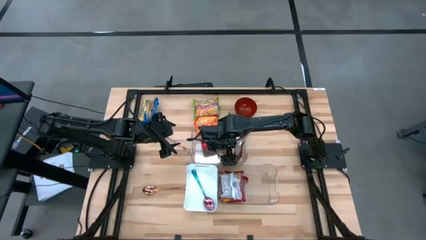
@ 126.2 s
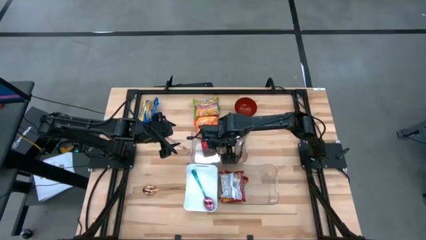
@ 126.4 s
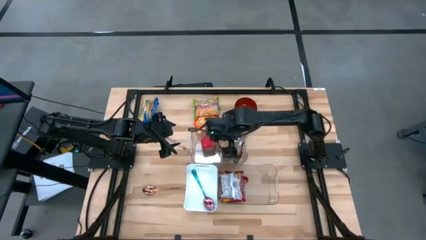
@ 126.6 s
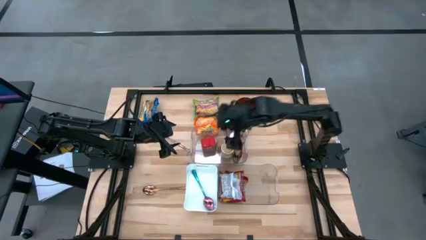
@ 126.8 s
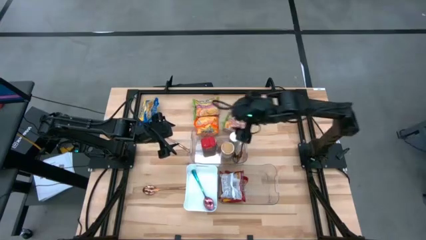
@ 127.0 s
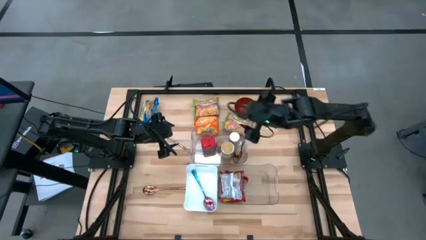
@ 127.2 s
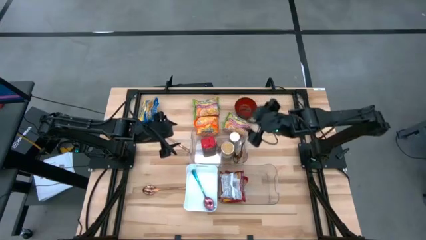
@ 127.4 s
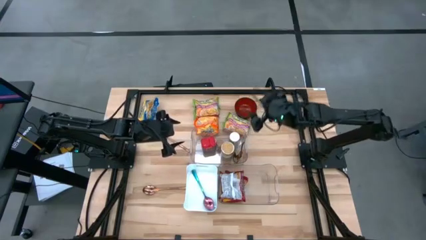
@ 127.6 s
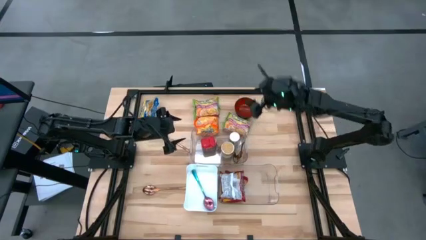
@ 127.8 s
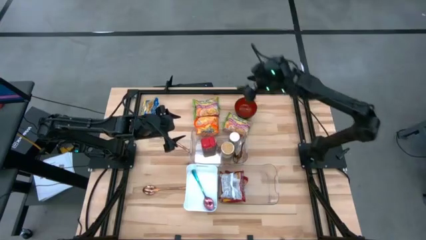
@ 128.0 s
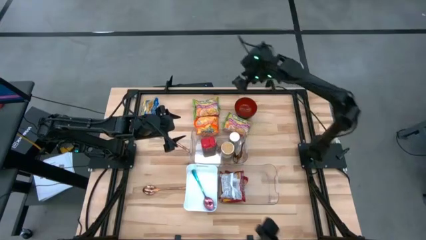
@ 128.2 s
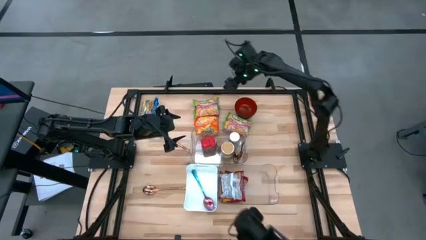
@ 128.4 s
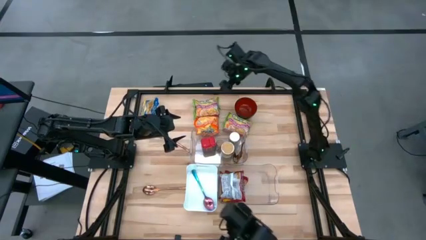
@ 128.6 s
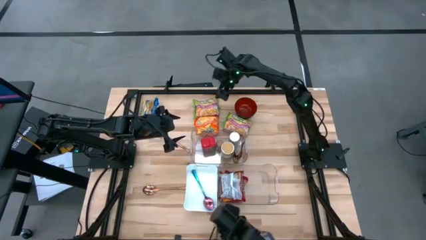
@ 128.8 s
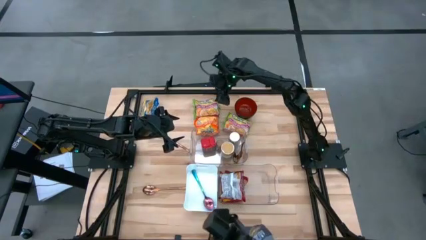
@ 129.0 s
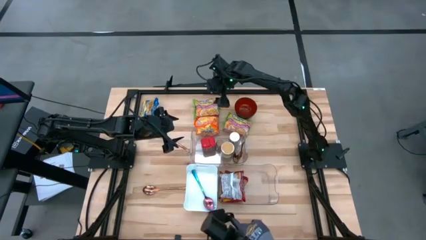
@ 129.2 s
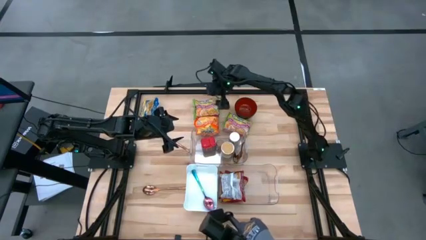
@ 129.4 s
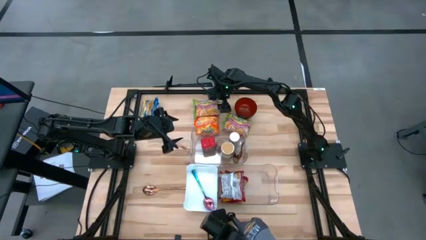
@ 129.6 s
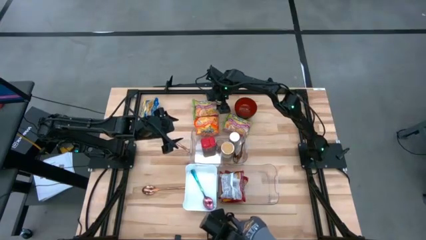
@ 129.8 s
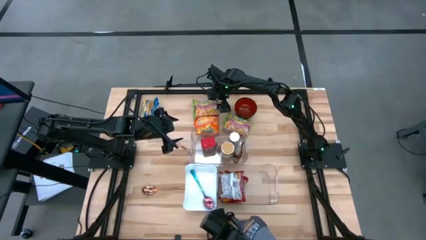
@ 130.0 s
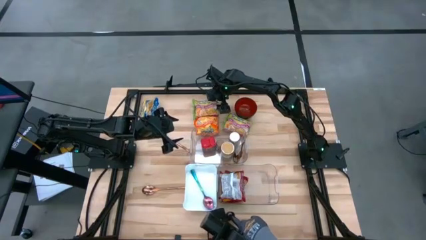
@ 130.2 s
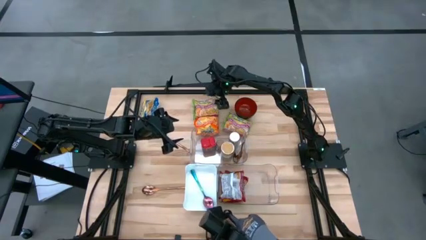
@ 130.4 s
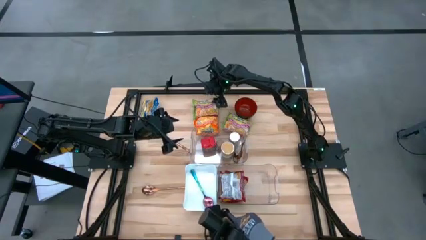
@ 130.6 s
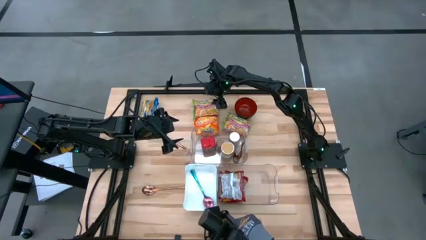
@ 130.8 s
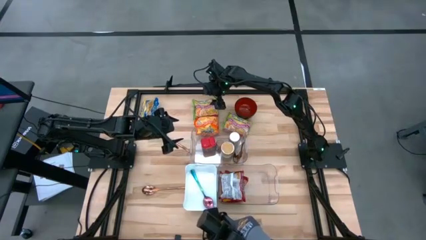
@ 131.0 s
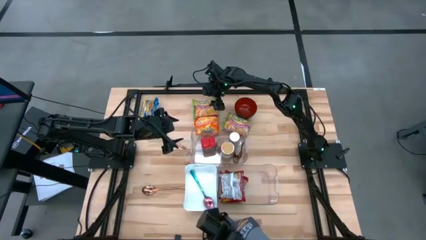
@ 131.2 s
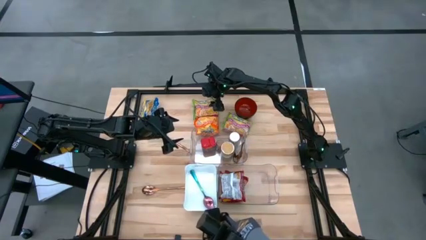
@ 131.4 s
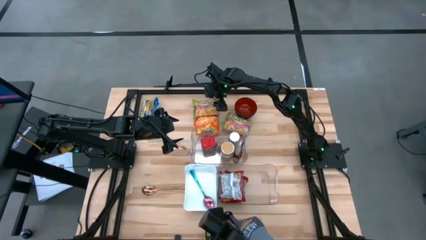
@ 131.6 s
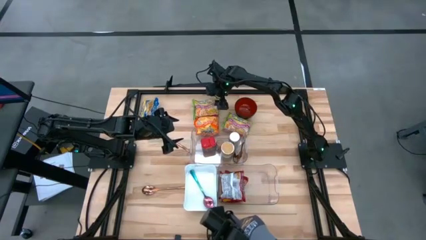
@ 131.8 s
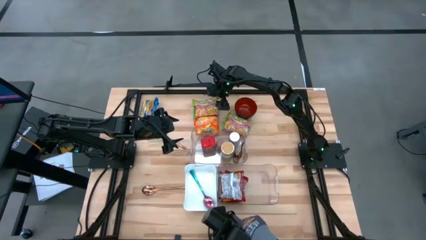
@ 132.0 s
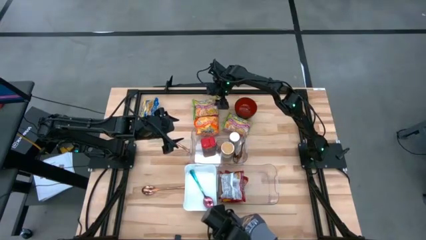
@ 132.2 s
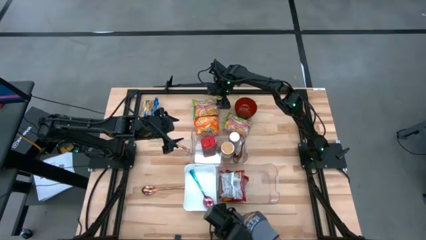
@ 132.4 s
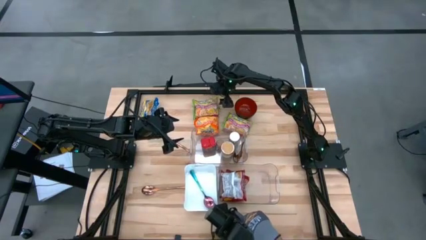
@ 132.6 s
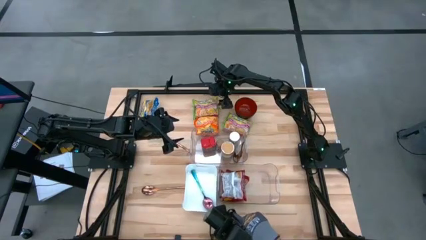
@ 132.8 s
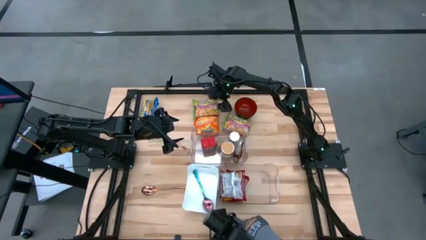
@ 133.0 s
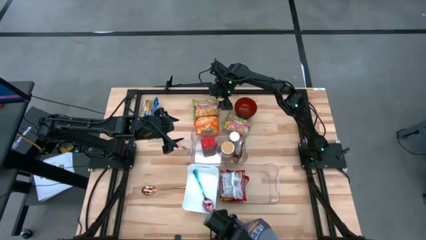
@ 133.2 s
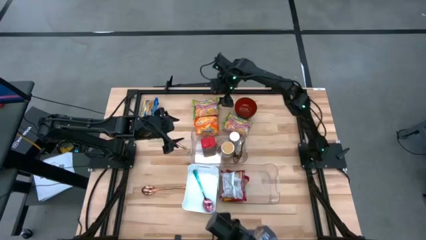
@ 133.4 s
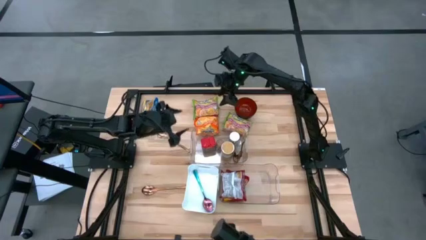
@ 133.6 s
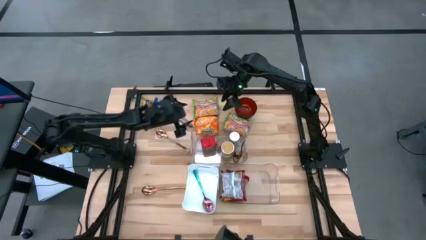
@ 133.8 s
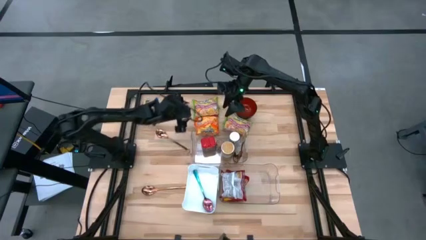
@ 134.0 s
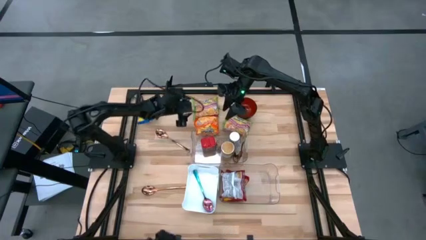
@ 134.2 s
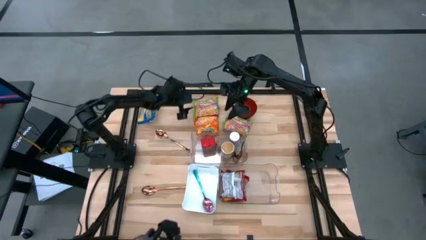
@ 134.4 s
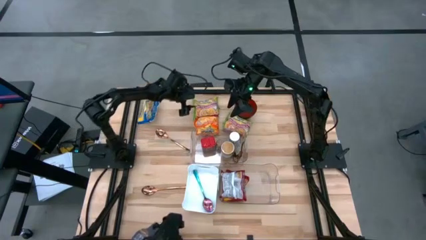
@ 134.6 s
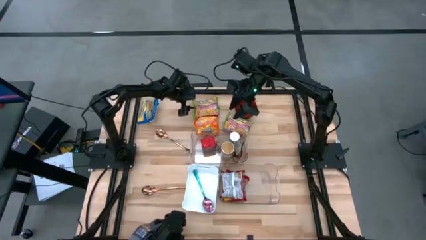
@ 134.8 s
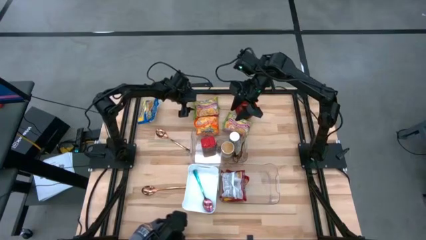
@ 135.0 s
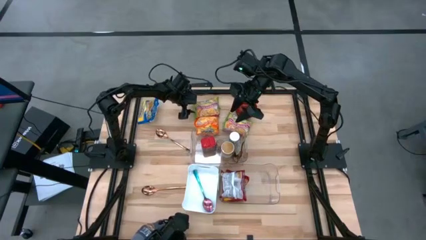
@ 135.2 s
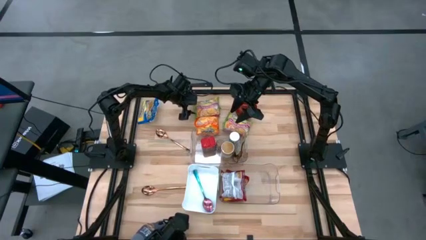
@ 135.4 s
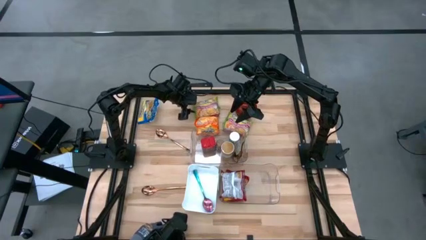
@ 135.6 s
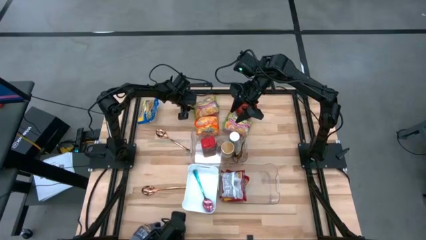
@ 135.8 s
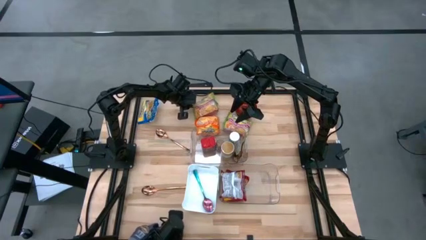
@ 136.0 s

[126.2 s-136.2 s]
Task: Pick & Place Food Item
Put the top green noodle pack into the bottom transparent bin
